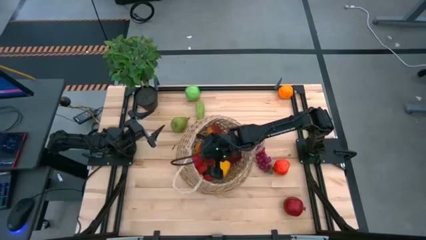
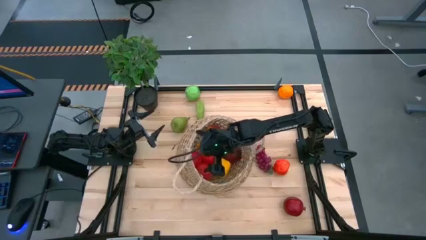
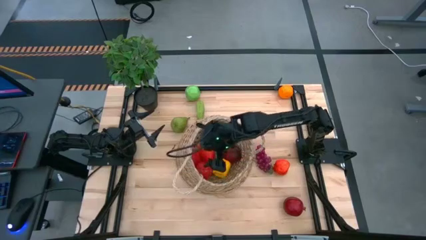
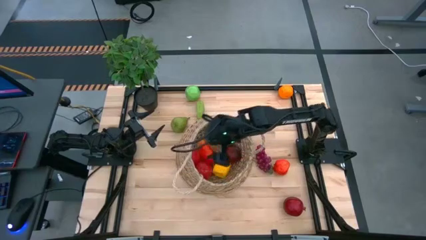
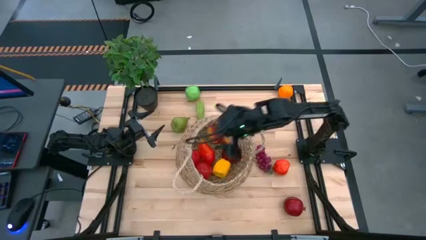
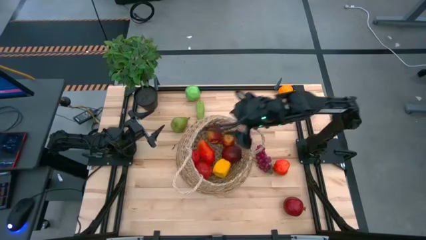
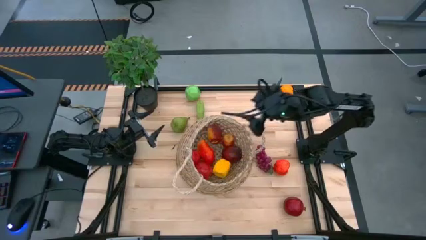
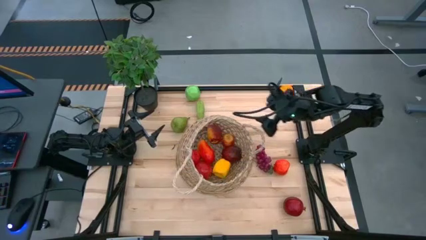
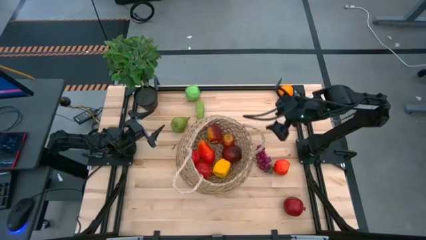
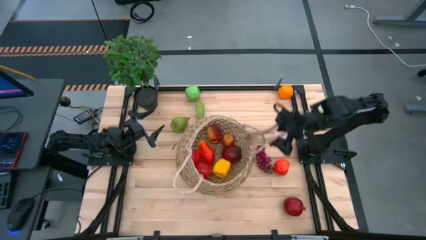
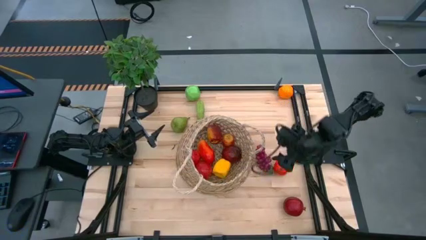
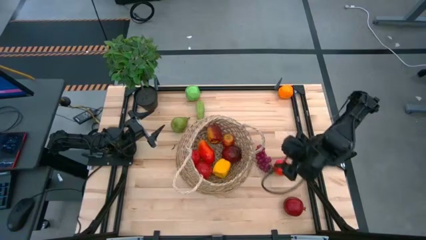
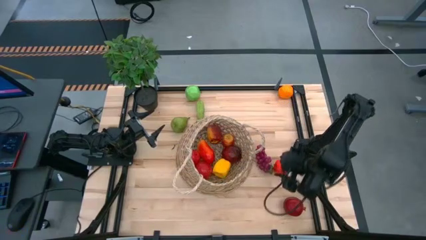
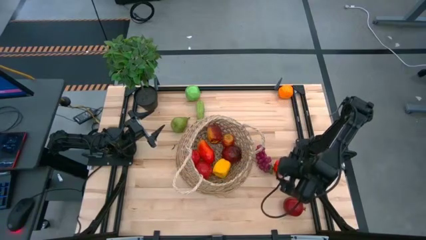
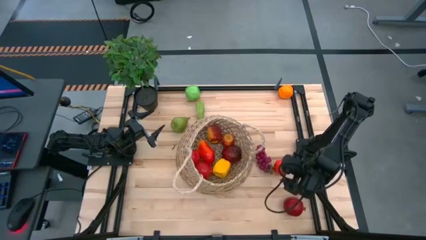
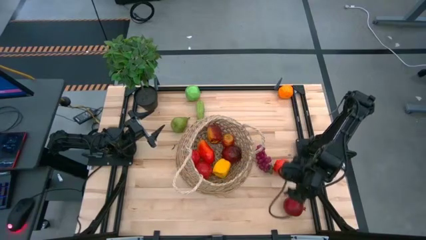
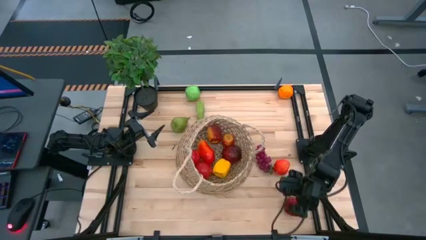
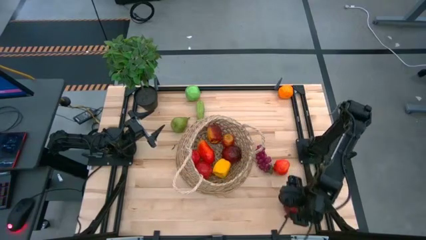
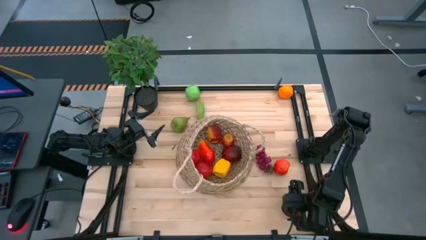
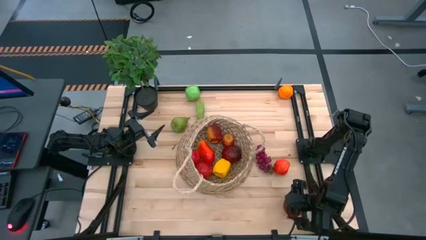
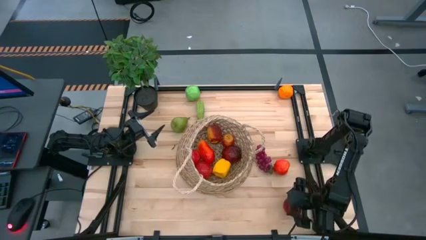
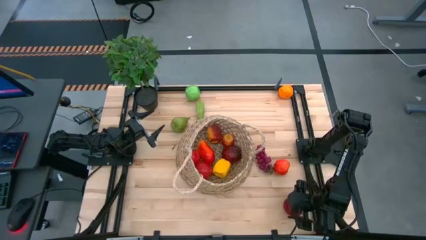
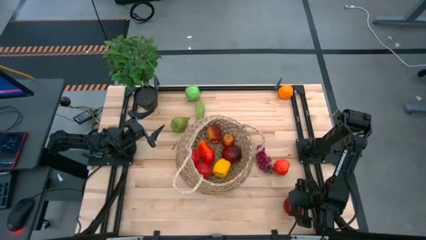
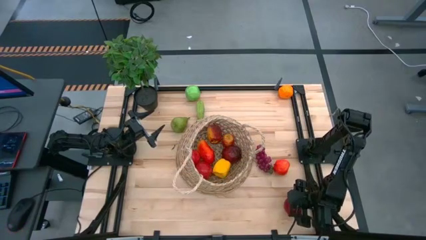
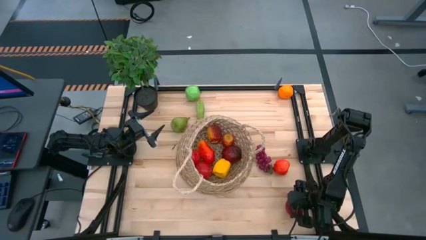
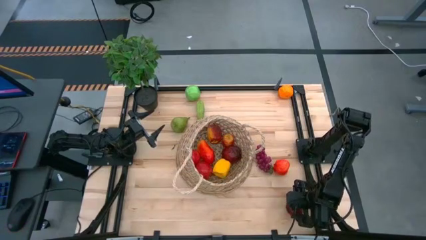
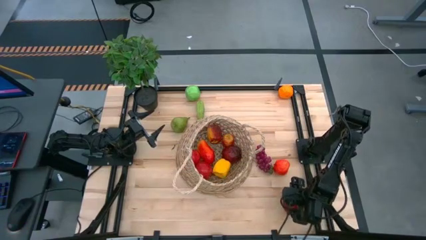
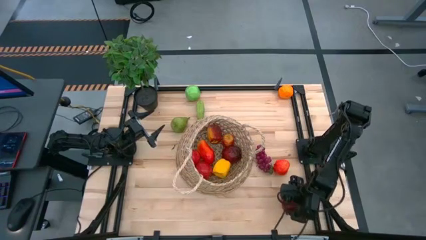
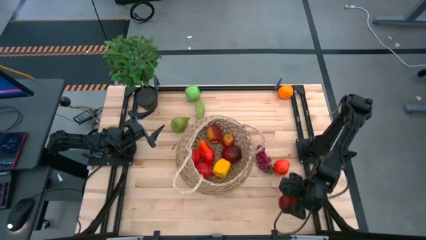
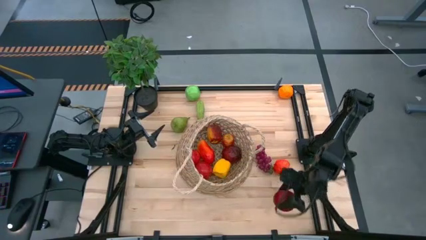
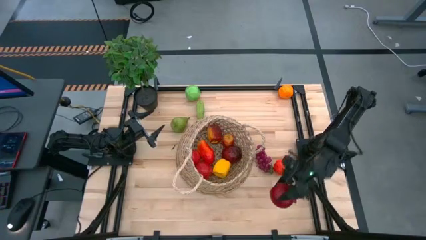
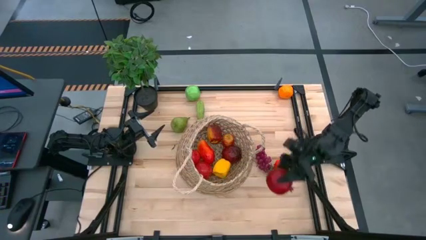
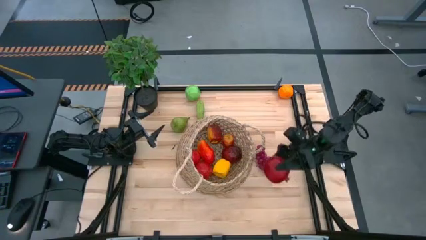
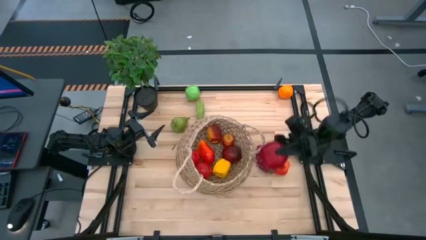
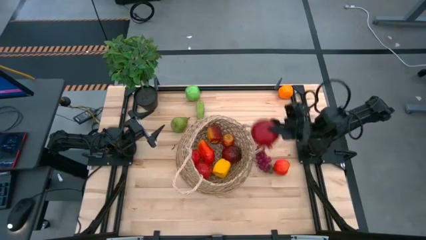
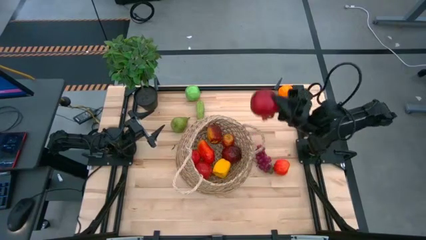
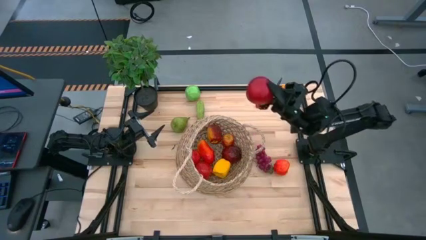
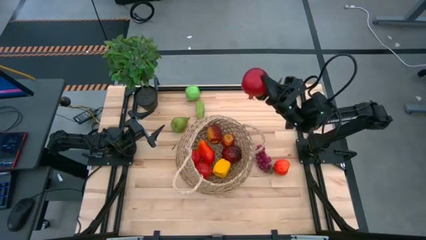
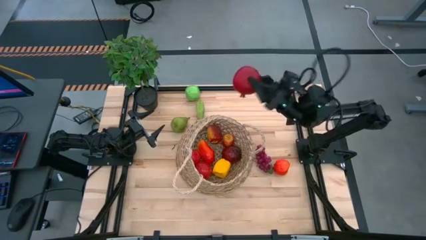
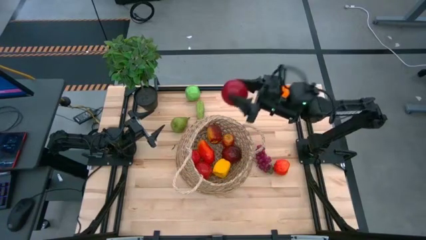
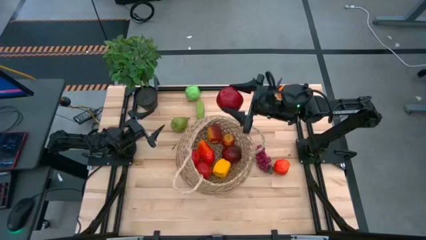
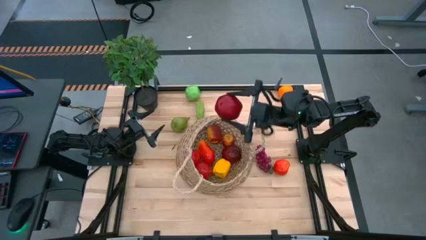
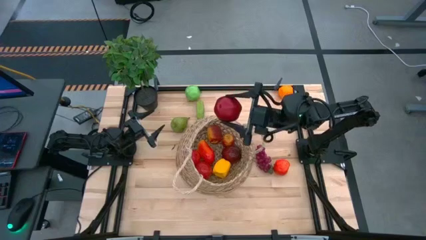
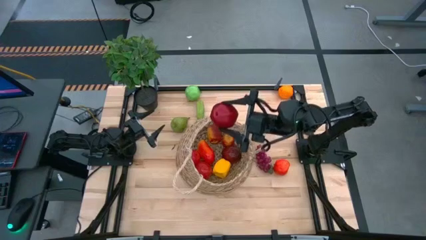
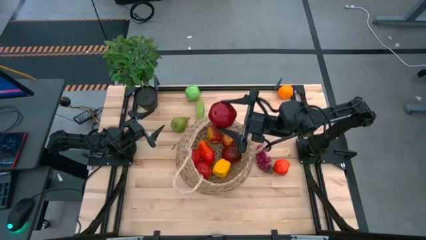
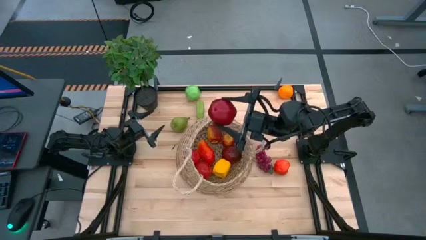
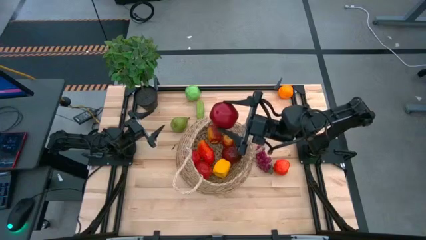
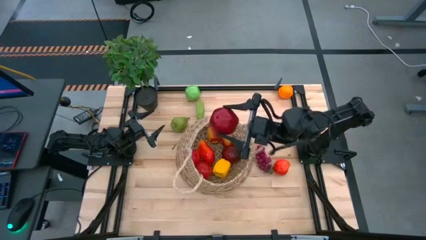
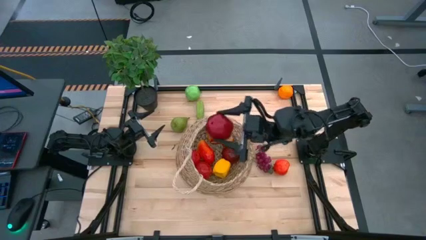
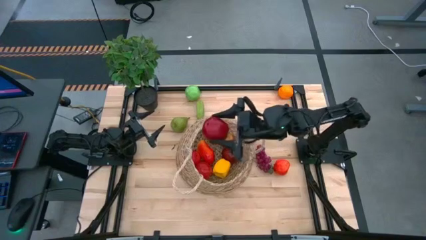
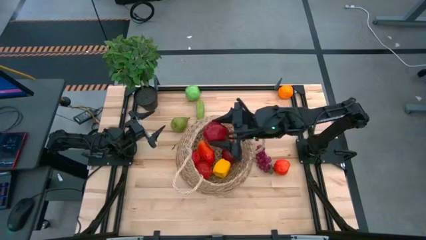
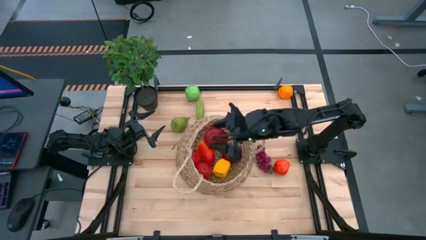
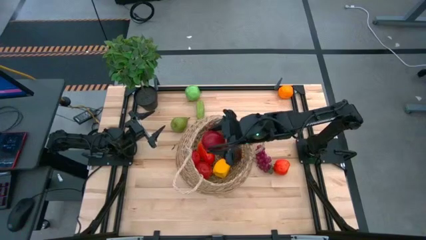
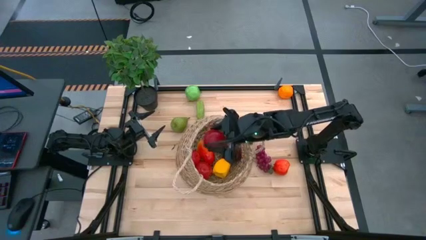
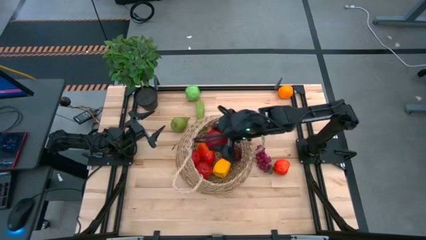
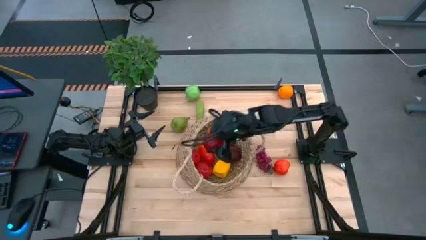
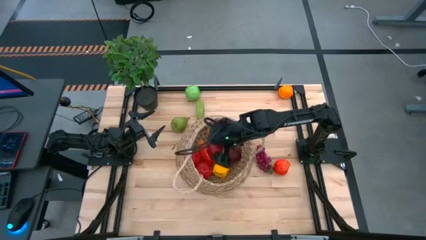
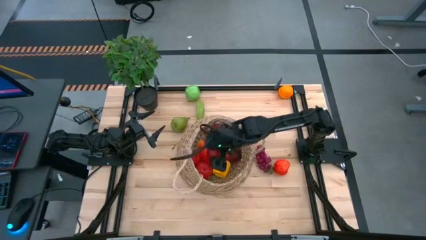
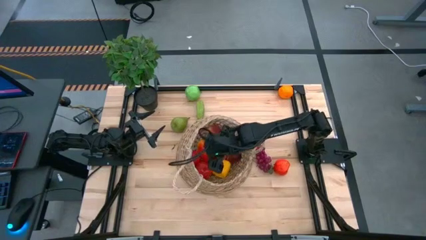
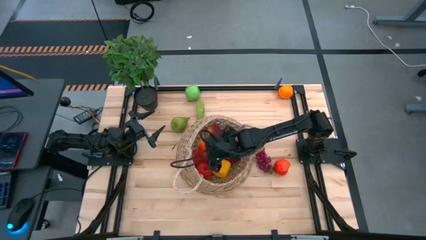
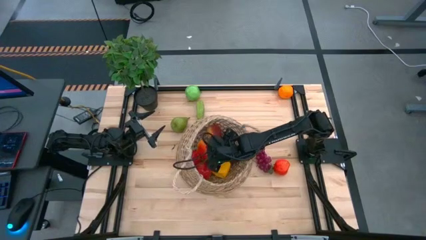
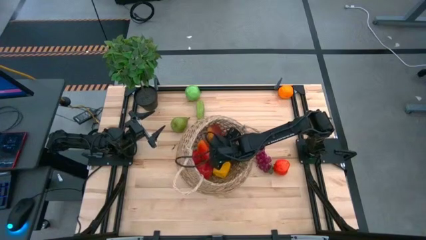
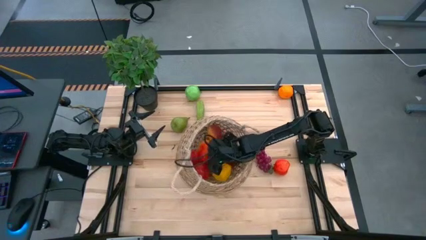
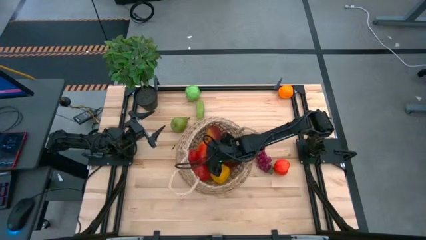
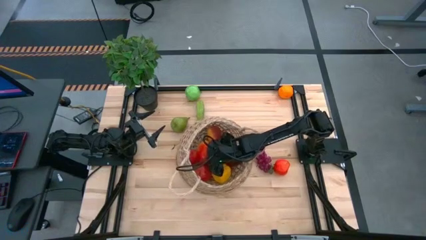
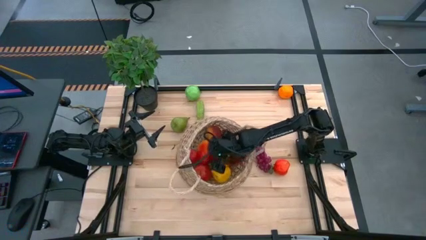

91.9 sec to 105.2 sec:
Task: Build produce basket
Put the pomegranate into the woven basket

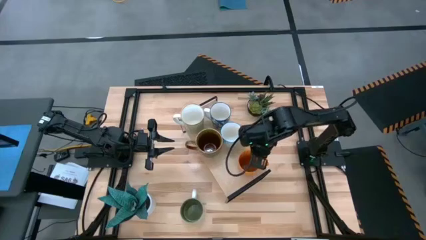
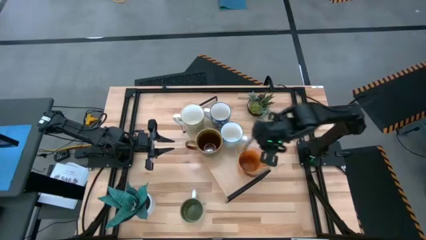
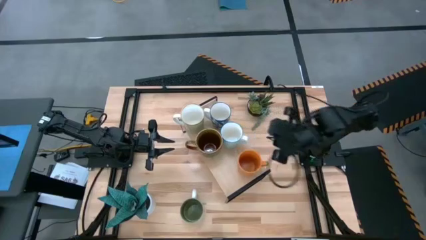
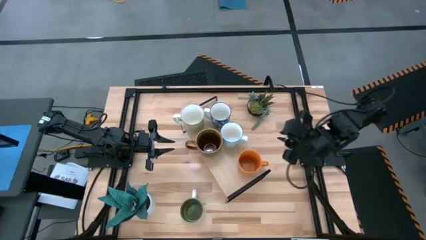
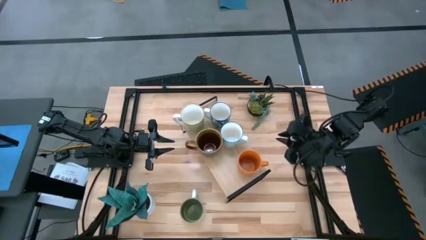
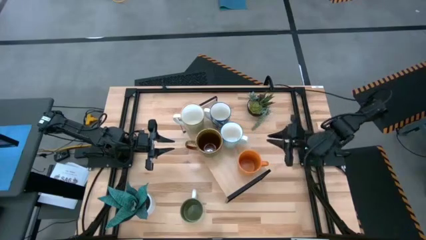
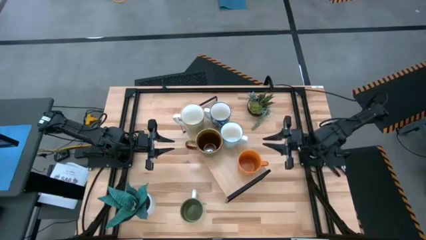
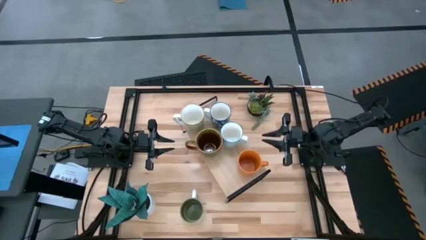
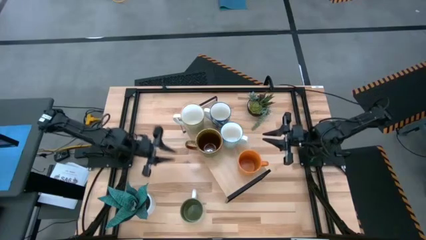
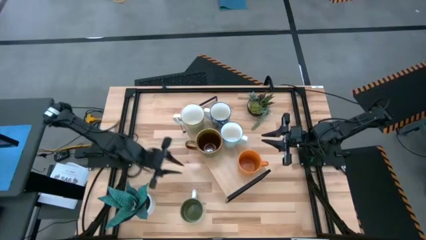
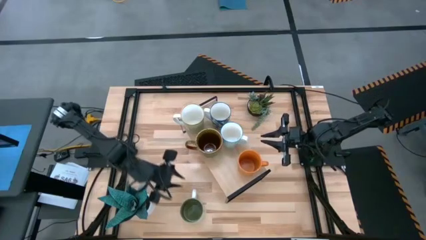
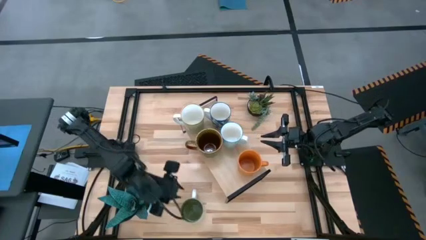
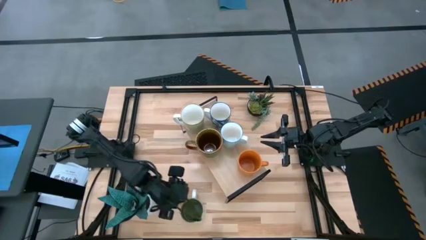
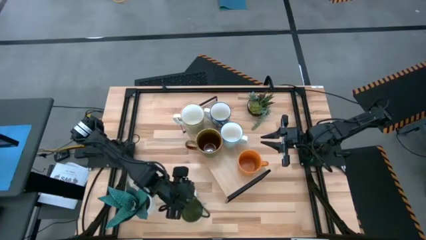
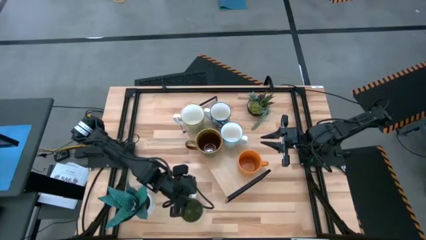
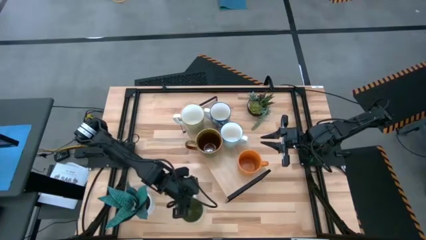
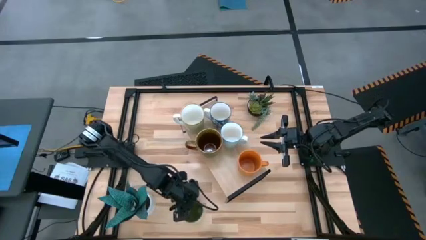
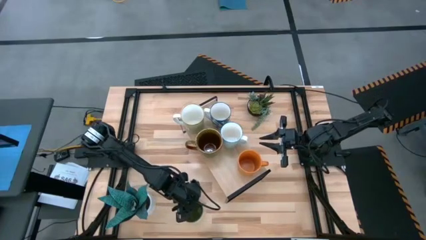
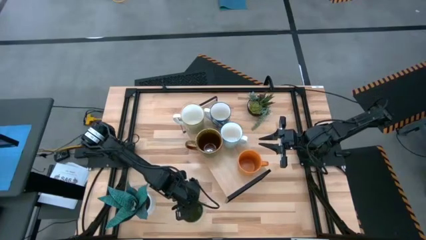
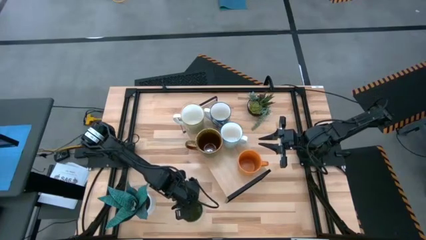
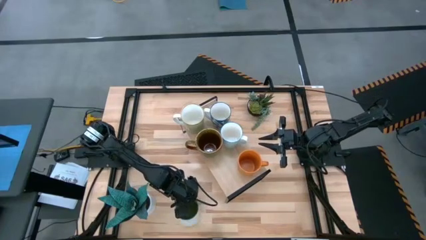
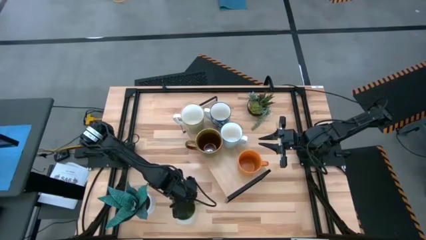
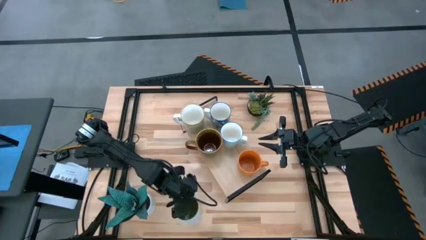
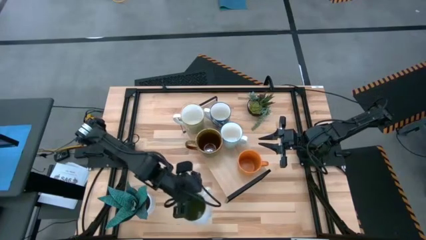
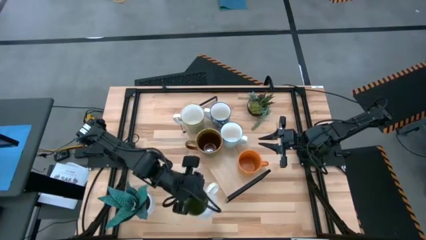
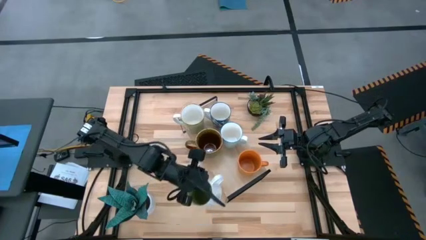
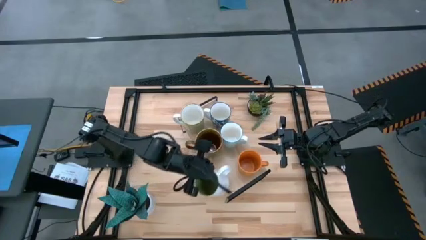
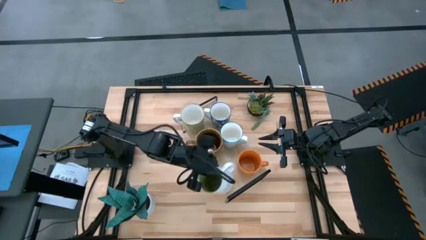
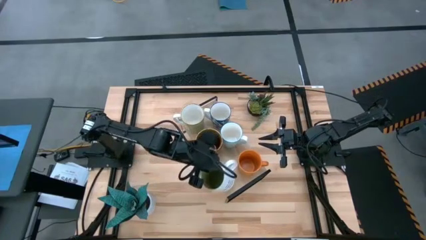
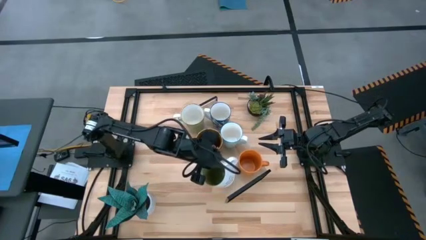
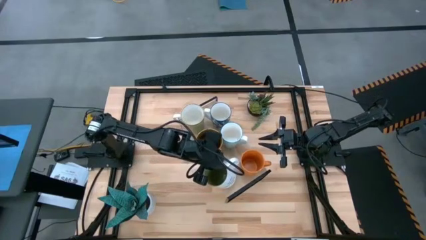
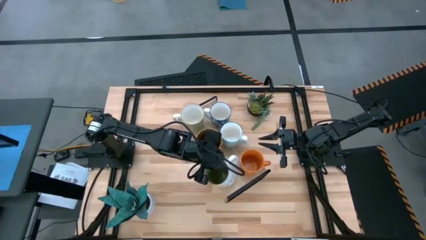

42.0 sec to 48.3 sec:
Task: Place coffee mugs
Put the white mug on the shelf
